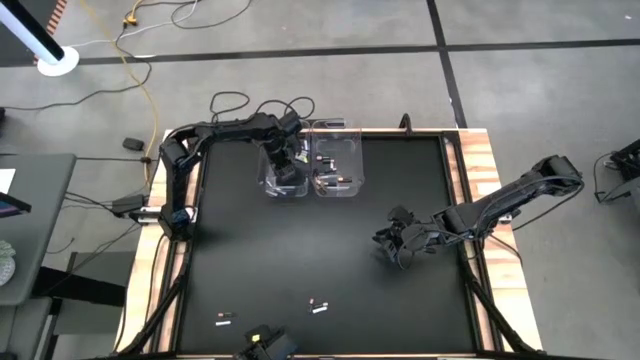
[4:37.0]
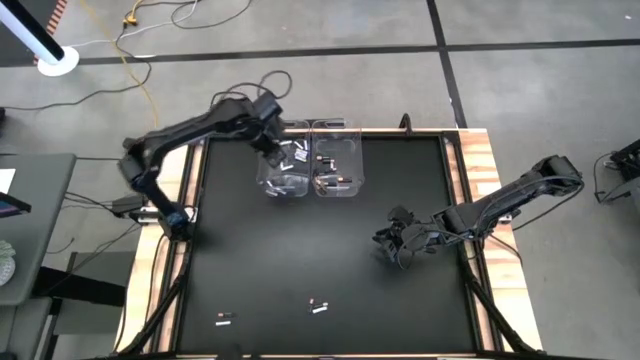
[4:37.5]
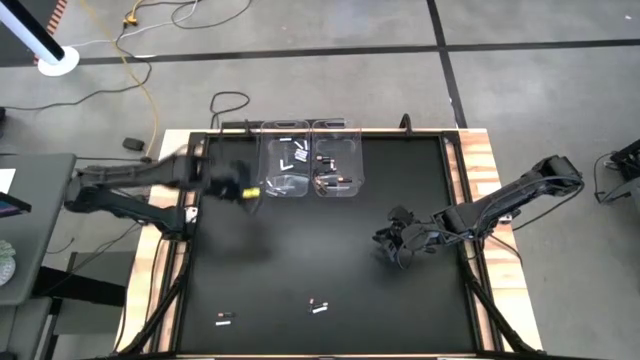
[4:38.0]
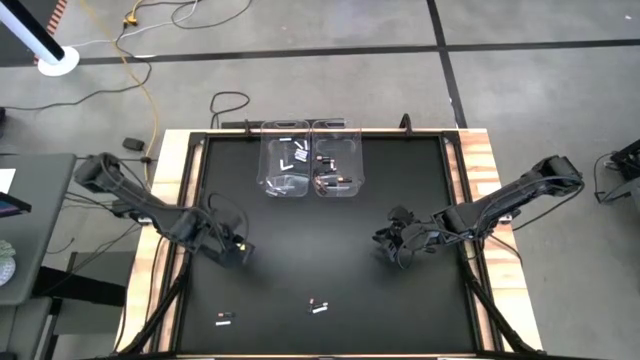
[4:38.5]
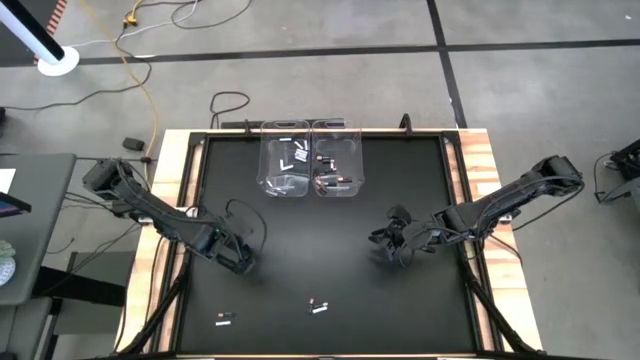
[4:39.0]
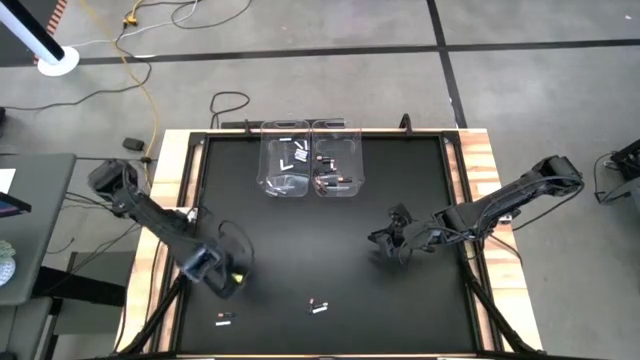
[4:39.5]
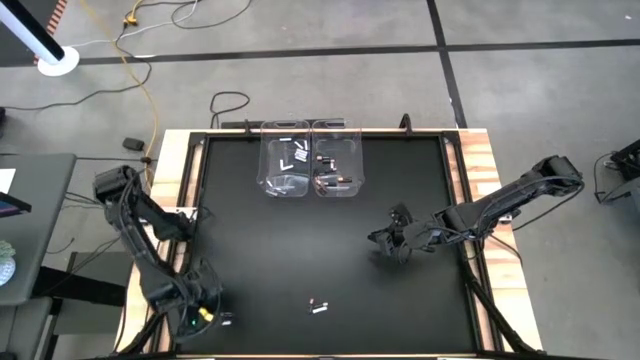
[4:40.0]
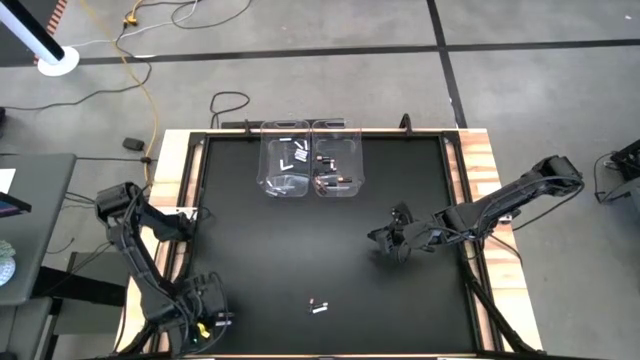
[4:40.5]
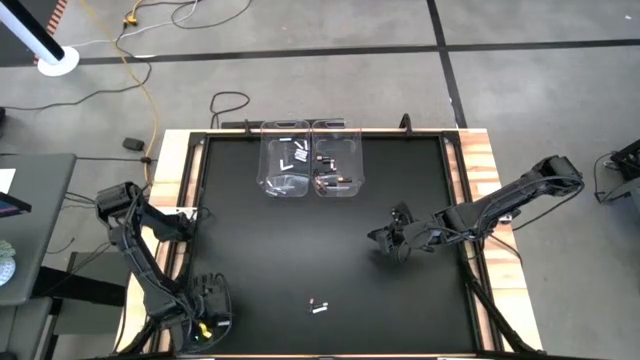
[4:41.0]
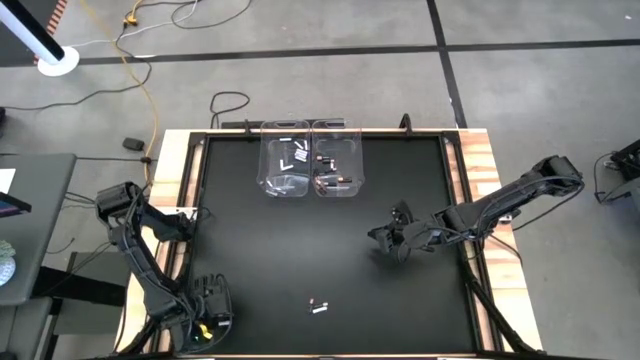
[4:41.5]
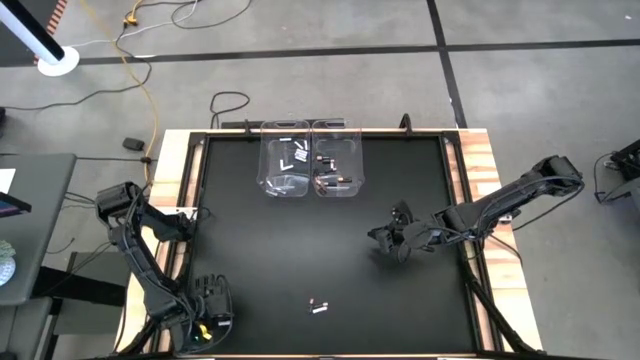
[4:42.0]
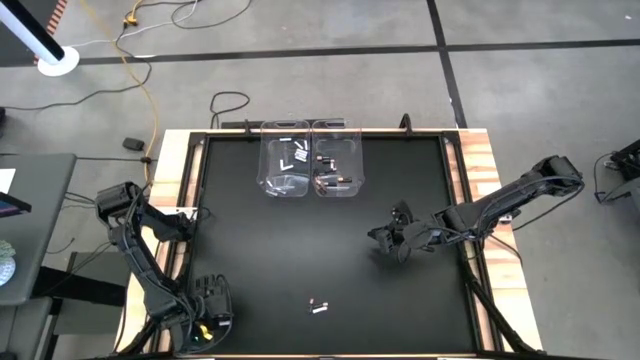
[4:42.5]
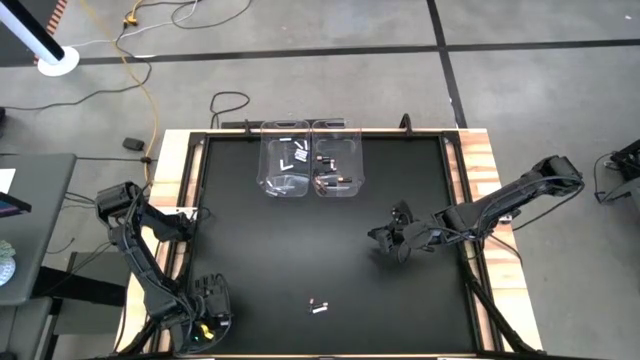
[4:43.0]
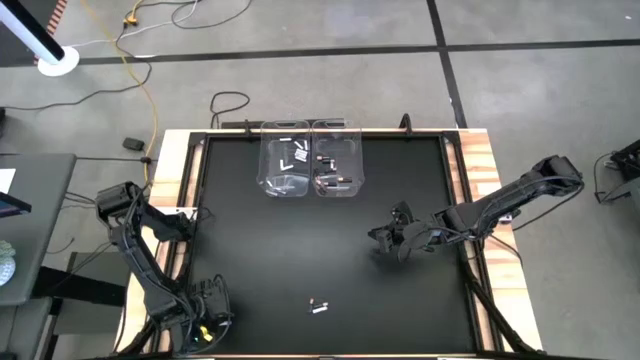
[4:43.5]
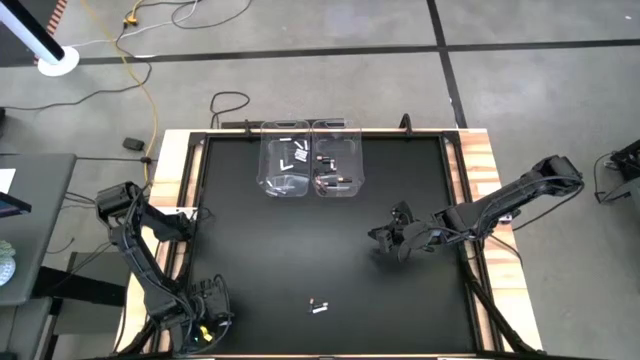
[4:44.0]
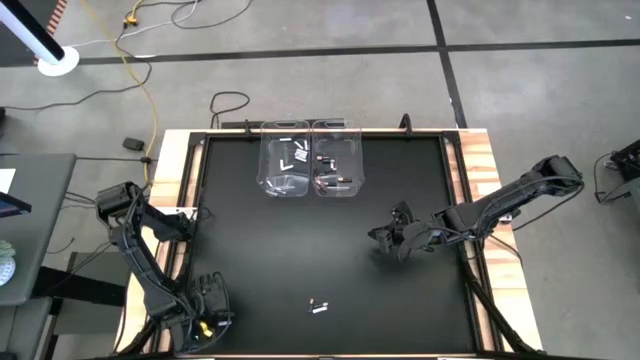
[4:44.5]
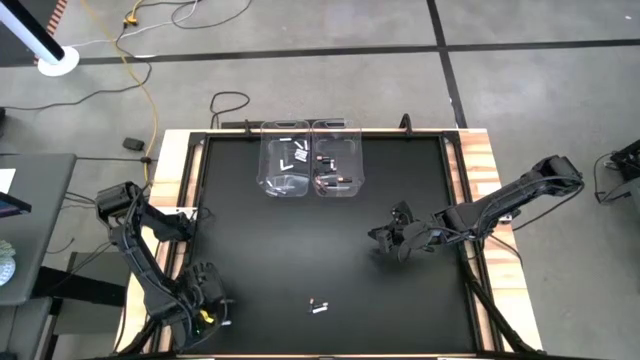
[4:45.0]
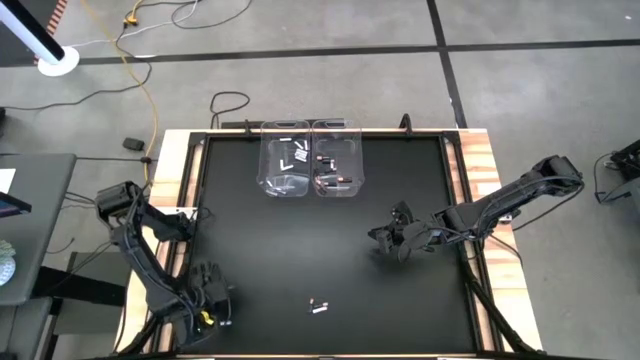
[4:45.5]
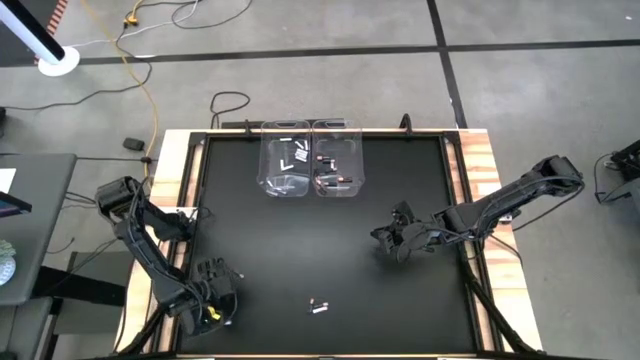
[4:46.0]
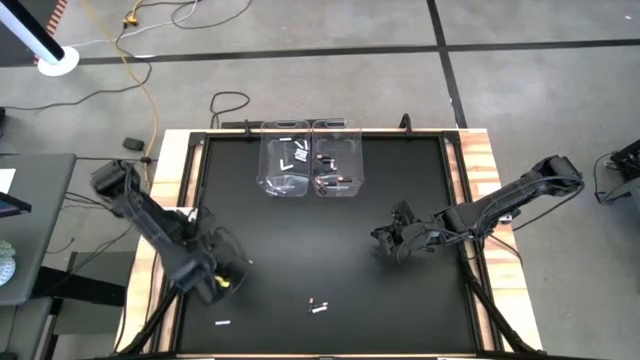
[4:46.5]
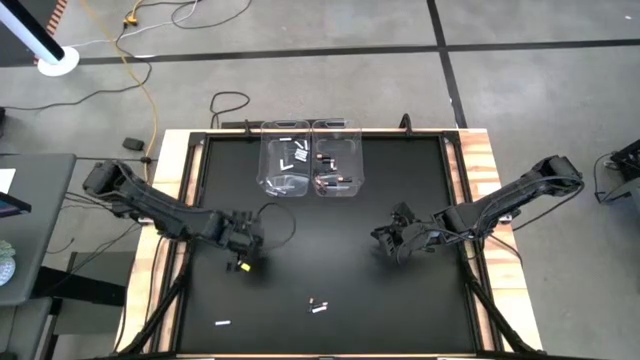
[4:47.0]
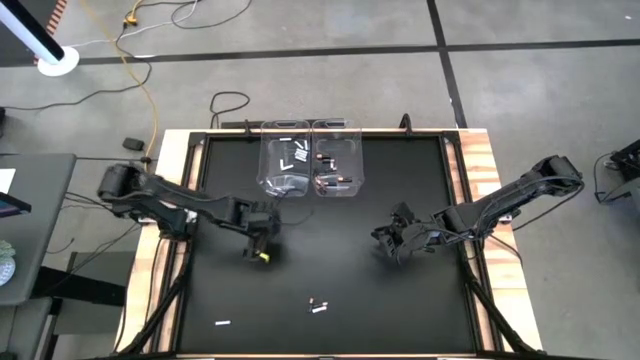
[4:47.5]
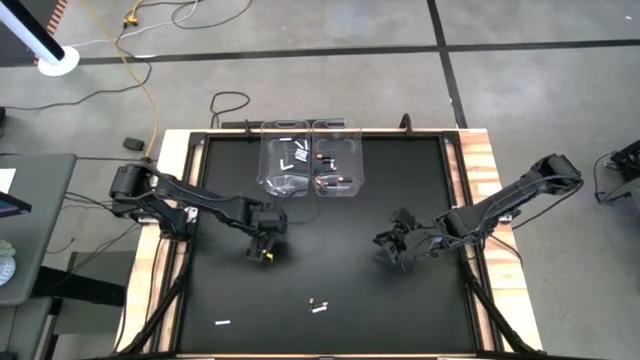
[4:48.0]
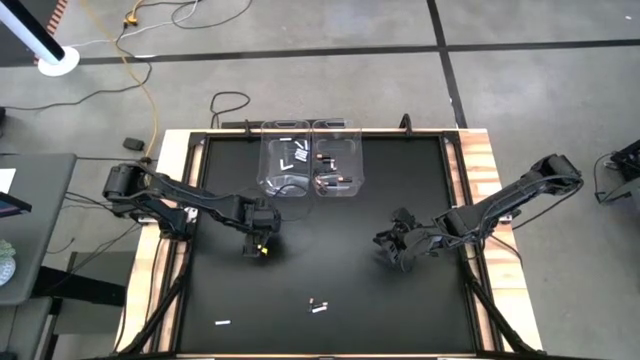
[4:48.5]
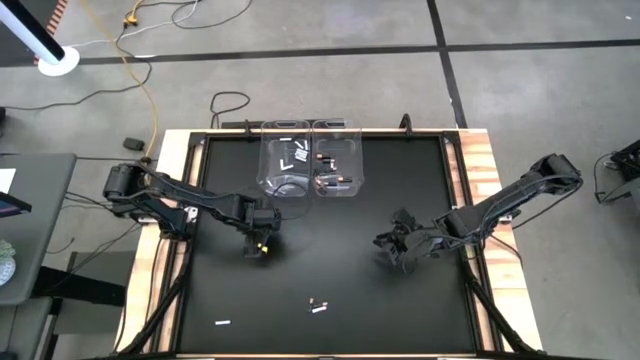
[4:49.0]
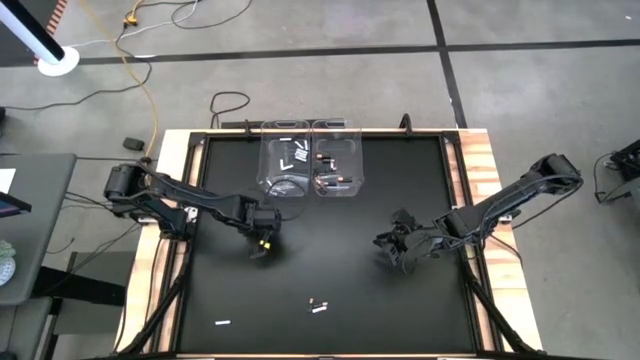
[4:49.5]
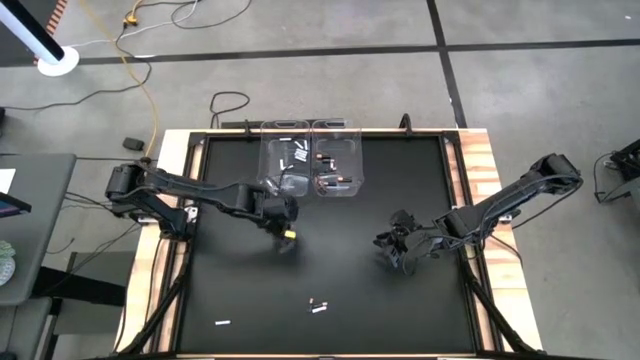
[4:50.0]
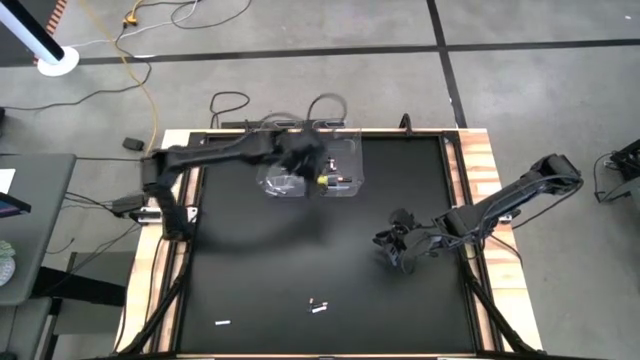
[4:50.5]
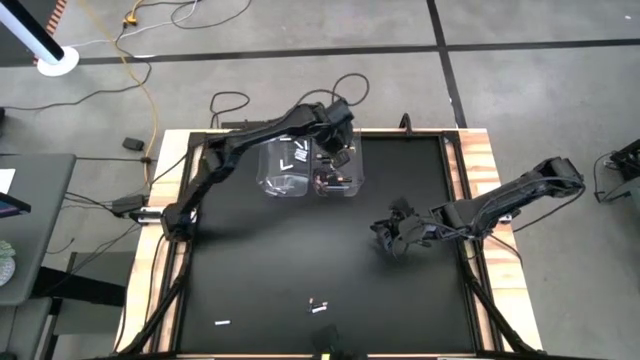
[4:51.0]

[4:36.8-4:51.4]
Task: Sort batteries
Put the black battery into the right transparent bin

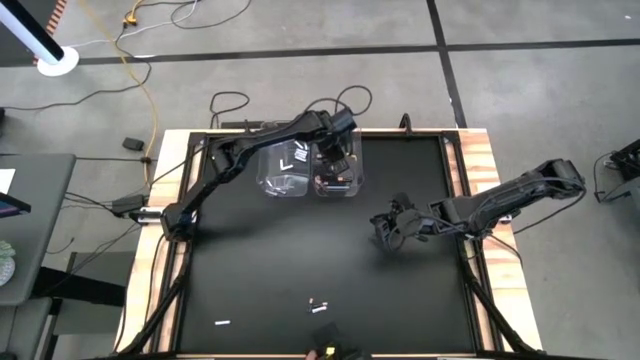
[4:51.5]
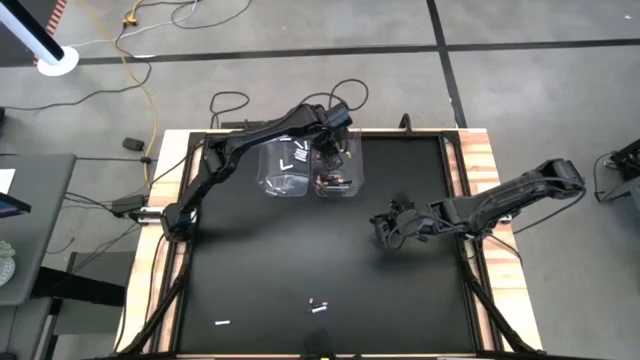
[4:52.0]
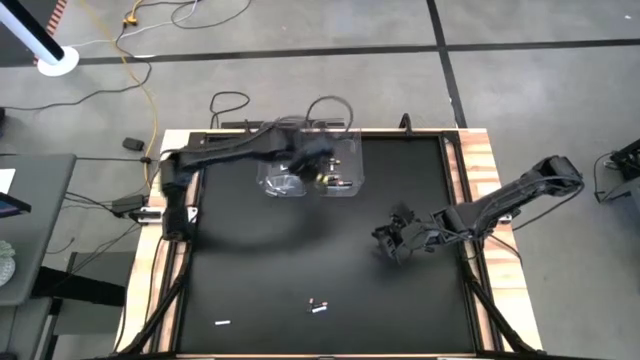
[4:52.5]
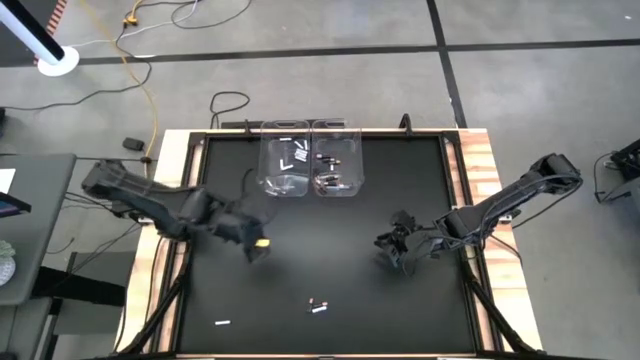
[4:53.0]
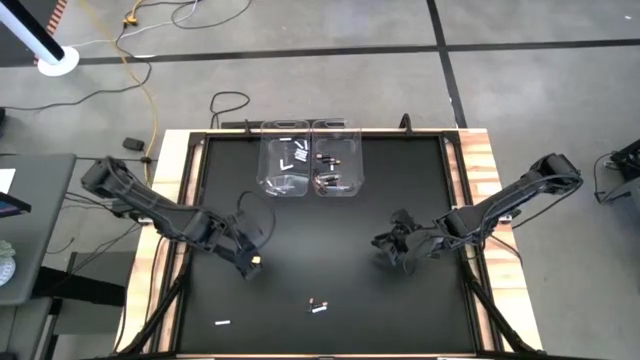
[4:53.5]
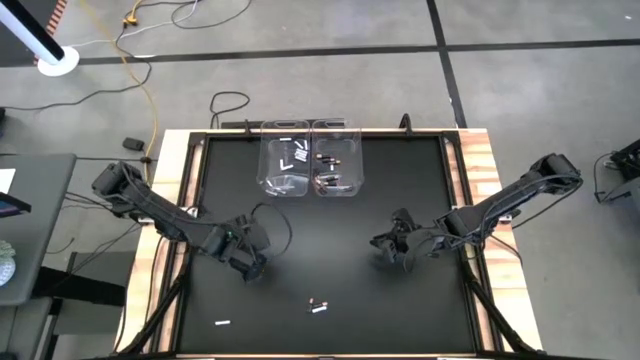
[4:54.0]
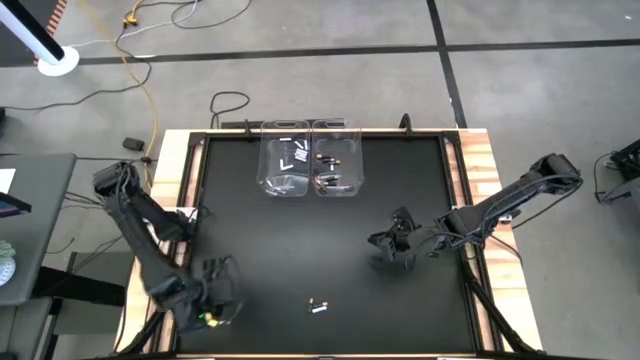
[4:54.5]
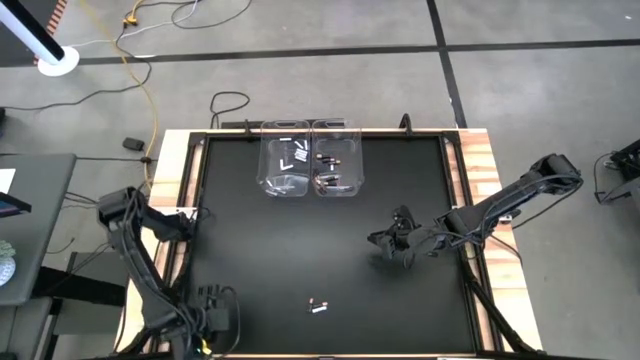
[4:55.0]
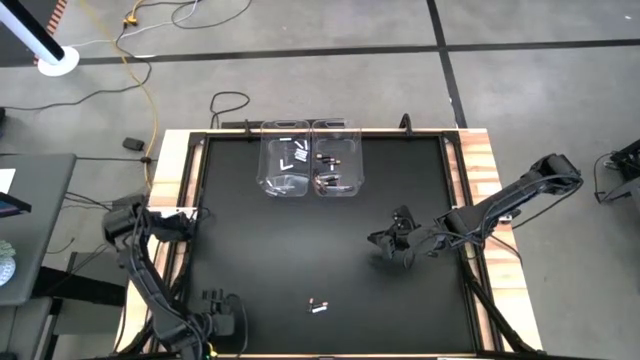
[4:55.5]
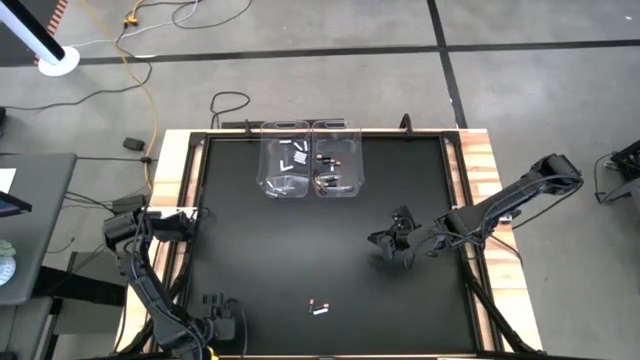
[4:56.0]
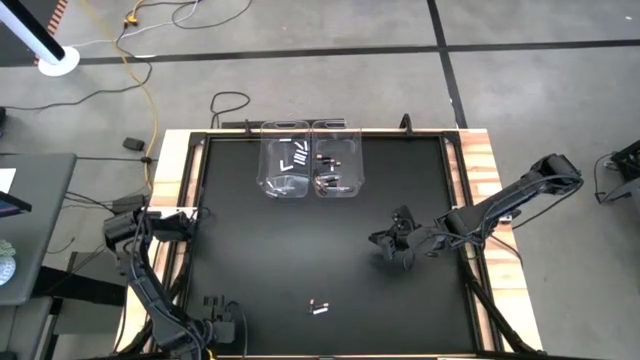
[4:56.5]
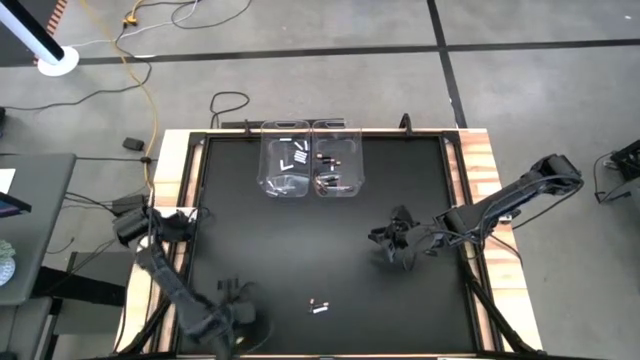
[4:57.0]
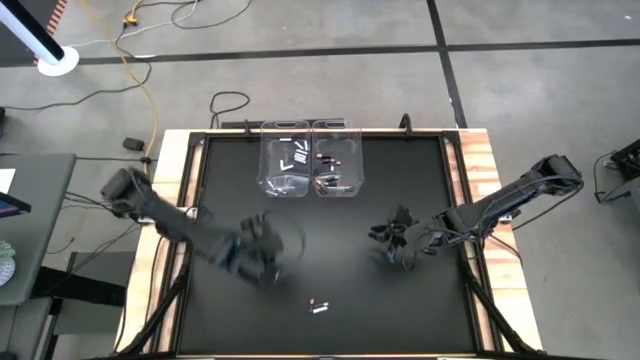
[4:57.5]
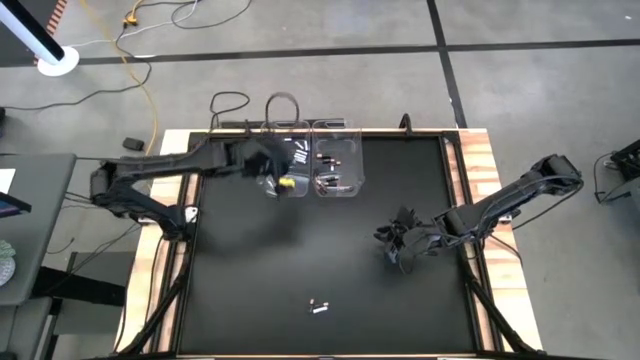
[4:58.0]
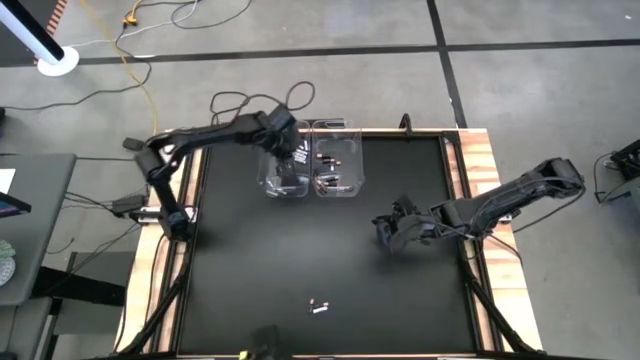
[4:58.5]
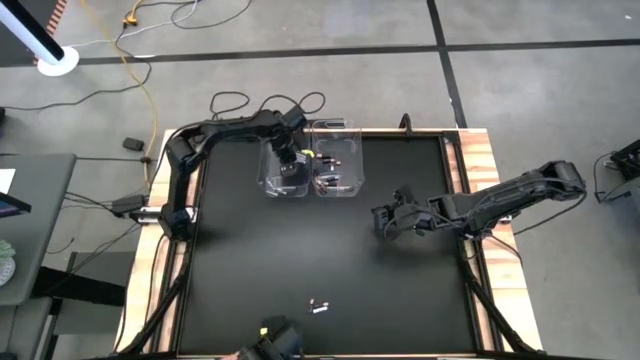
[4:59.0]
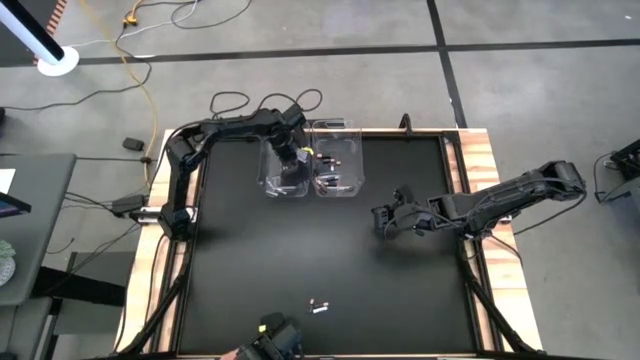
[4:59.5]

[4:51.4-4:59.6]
Put the white battery into the left transparent bin

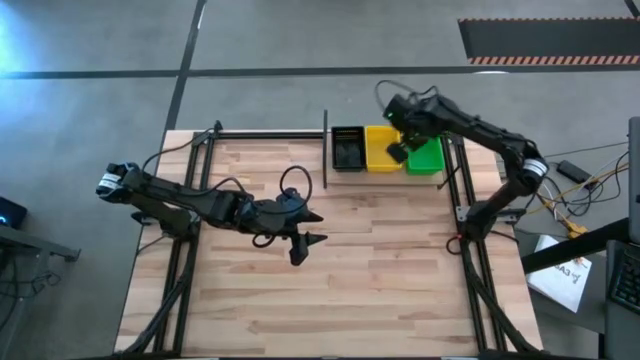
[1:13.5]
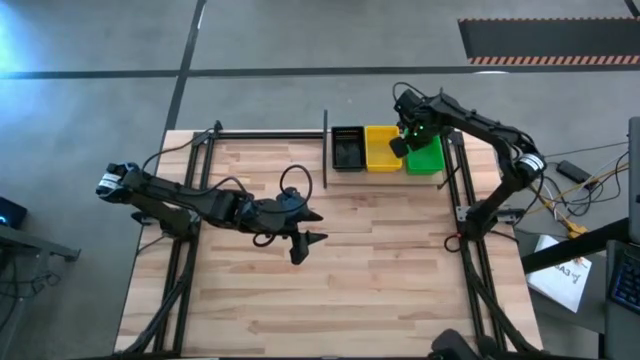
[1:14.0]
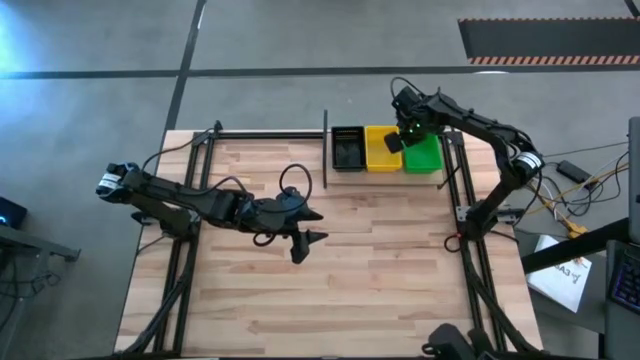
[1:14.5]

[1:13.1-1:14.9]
Task: Stack baskets on shelf by color
Adjust the stacked green bins on the shelf
